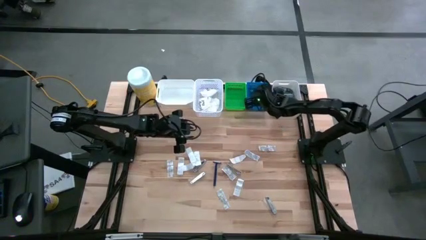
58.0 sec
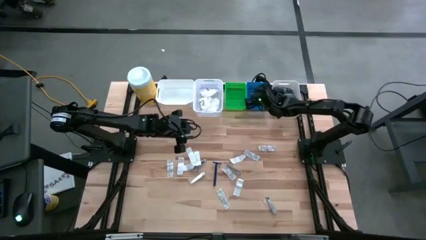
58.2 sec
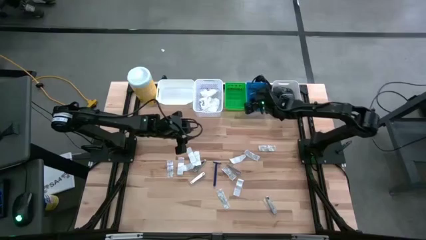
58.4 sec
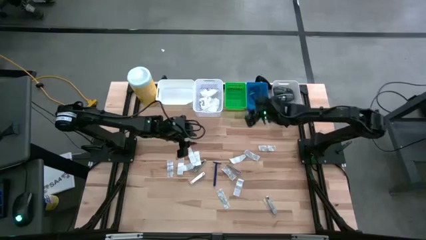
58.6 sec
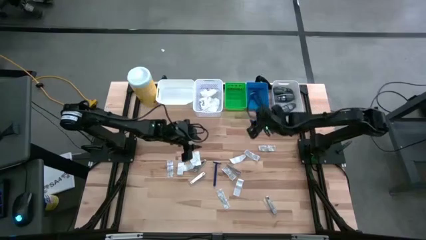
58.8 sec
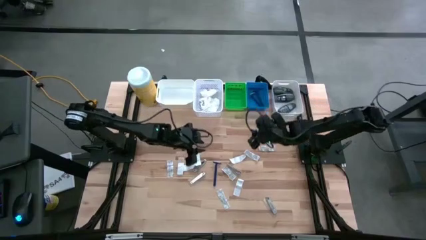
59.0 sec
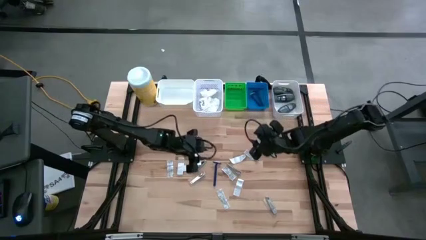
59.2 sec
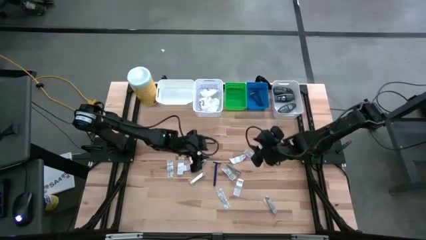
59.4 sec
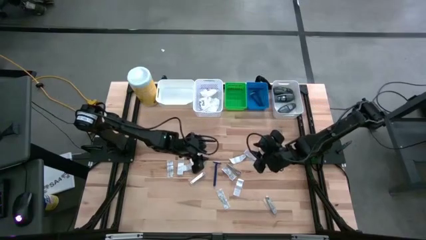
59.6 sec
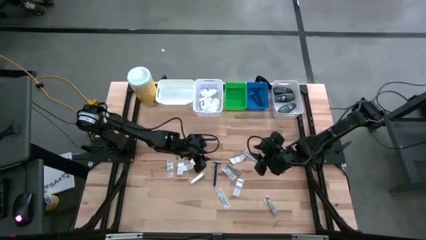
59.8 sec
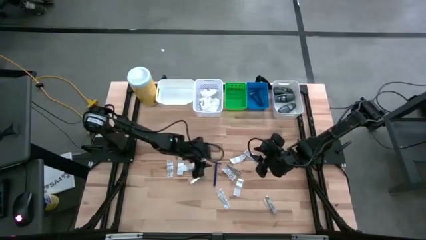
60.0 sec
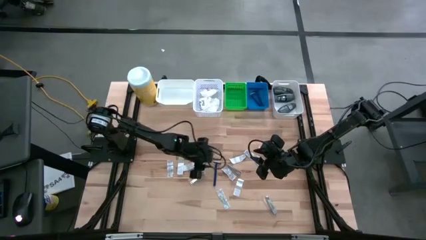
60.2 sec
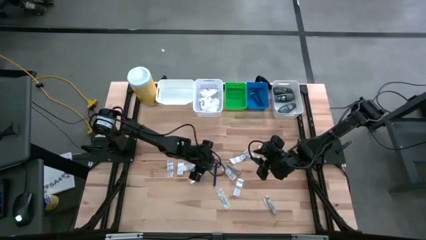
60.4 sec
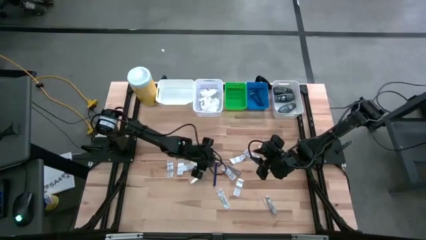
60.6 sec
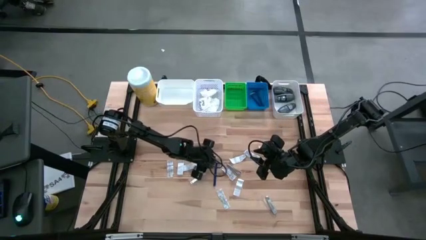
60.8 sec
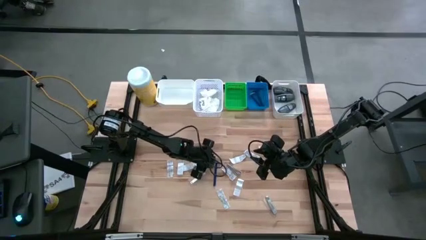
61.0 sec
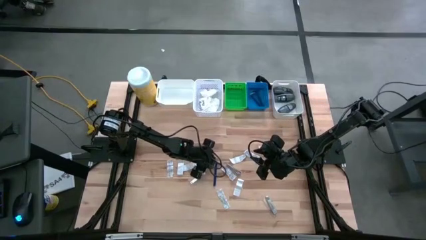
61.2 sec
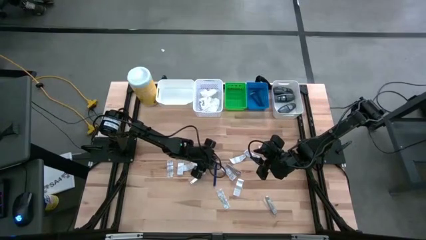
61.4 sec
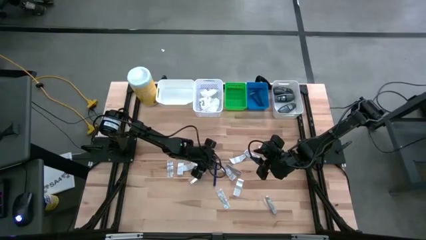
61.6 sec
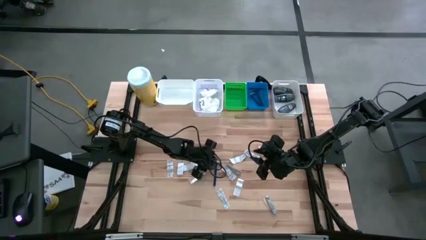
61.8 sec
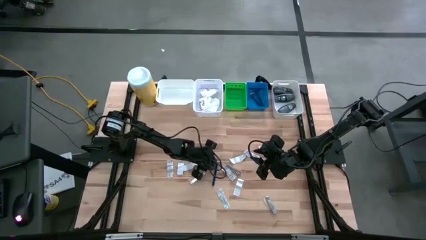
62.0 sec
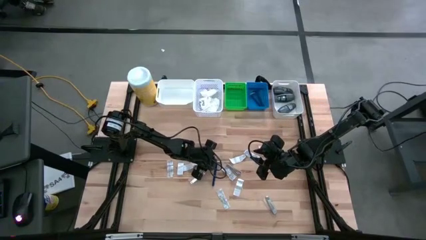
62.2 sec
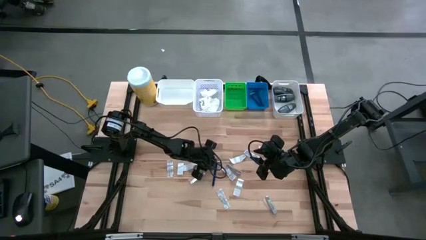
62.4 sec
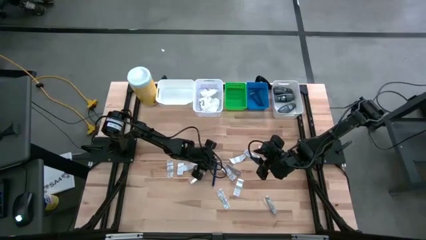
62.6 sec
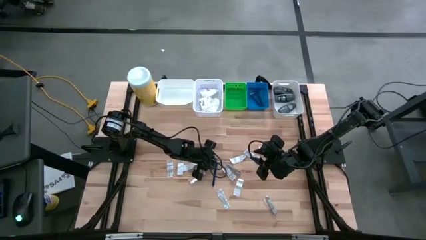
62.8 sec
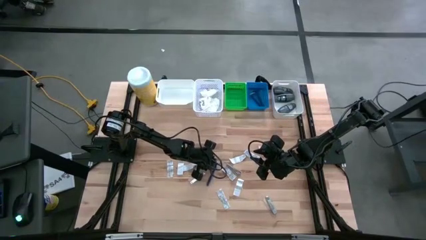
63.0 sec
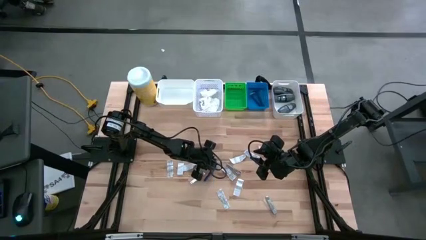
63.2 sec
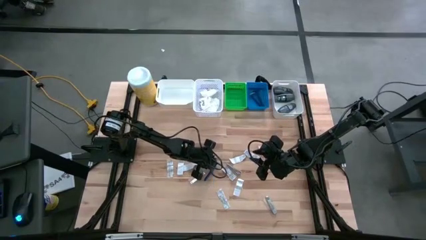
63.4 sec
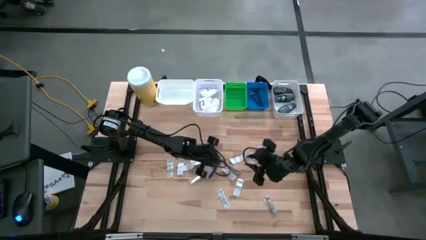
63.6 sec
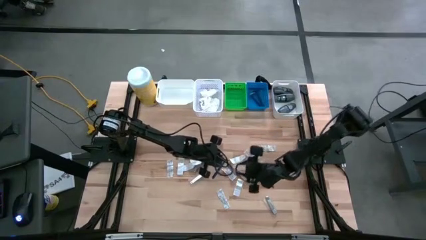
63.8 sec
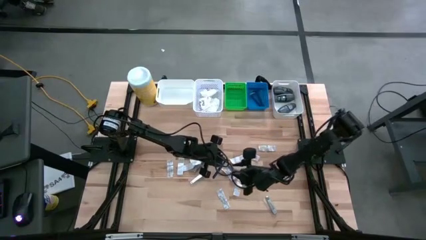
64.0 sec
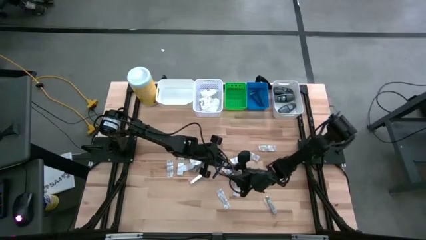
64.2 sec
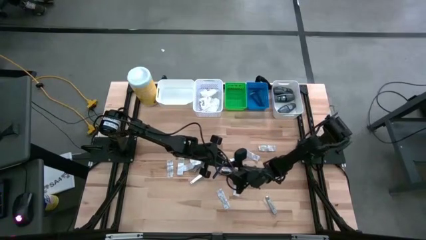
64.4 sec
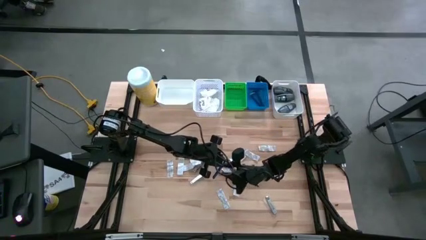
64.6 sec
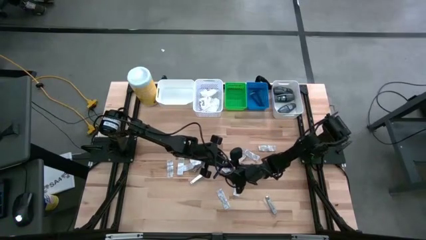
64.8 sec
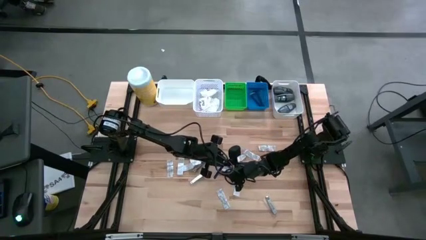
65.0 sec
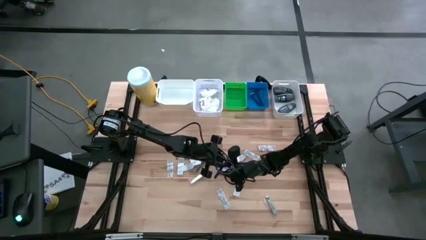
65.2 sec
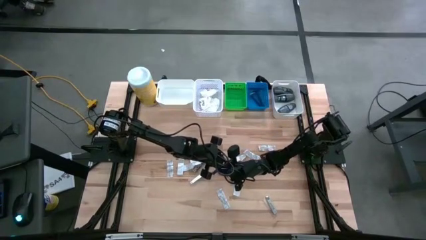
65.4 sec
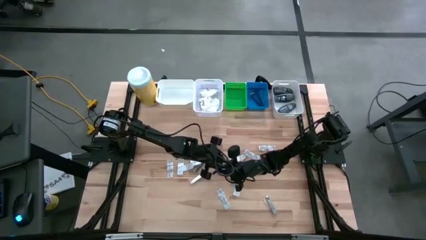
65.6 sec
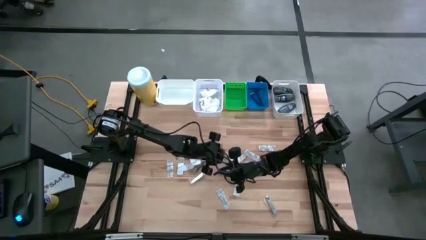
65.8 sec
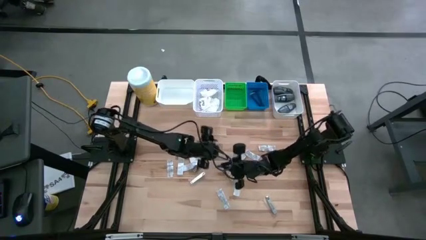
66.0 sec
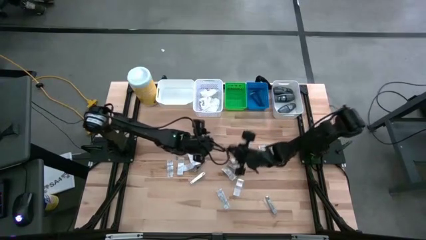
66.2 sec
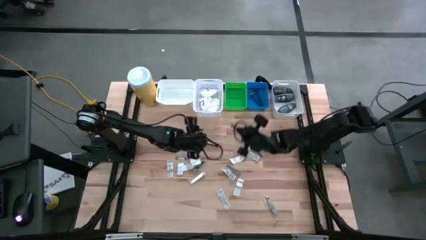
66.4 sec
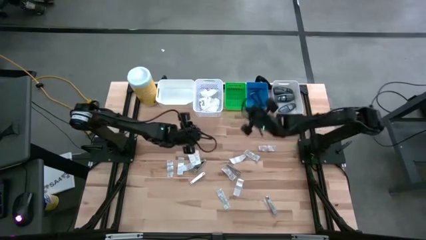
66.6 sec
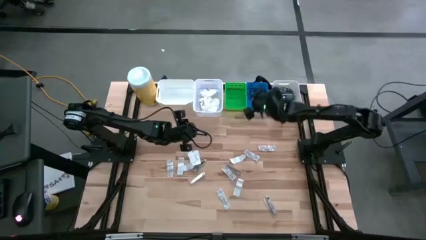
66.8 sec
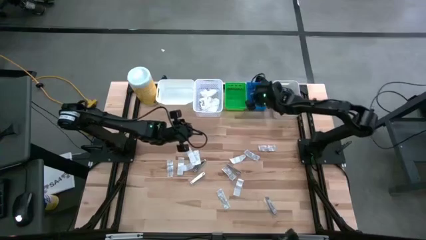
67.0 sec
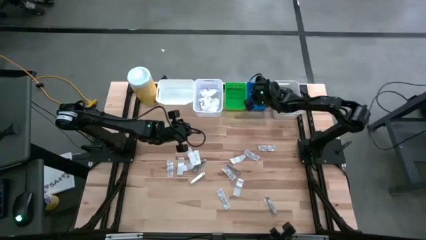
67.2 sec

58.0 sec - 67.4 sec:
Task: Pick & Place Travel size toiletries
Put the blue razor into the blue bin

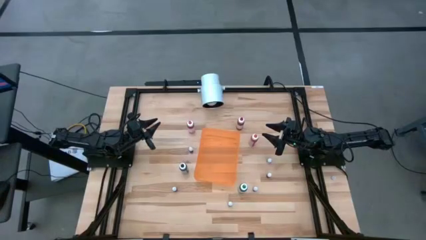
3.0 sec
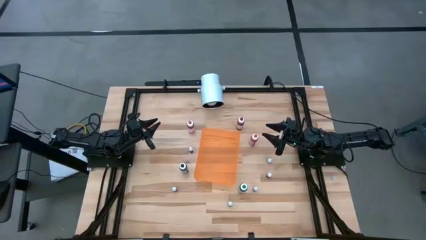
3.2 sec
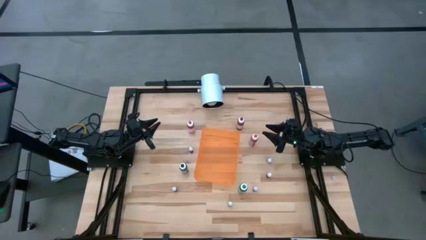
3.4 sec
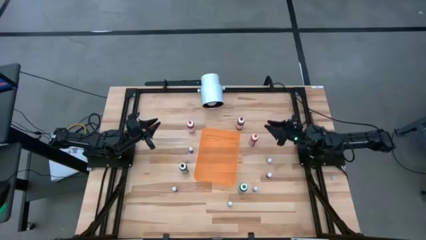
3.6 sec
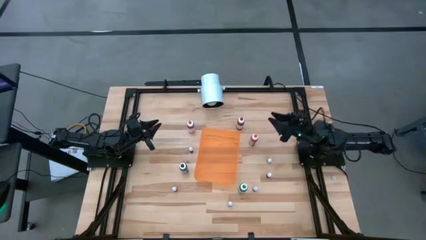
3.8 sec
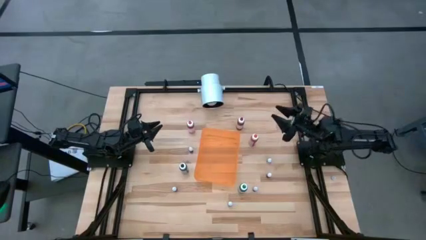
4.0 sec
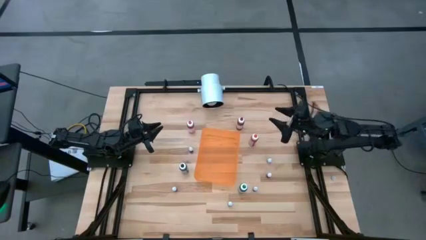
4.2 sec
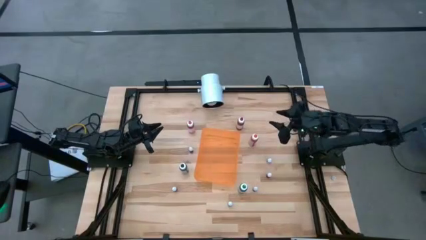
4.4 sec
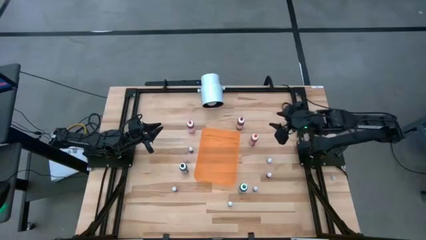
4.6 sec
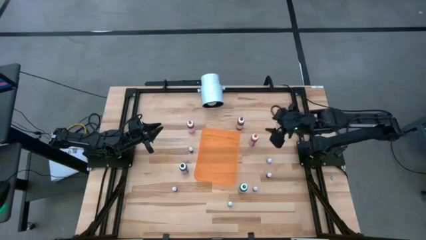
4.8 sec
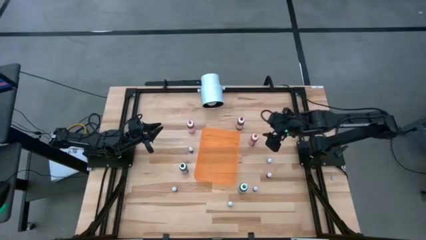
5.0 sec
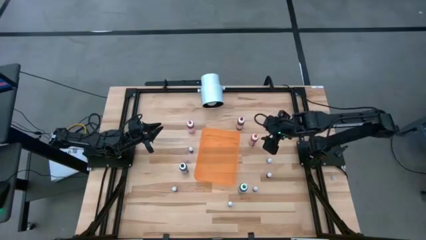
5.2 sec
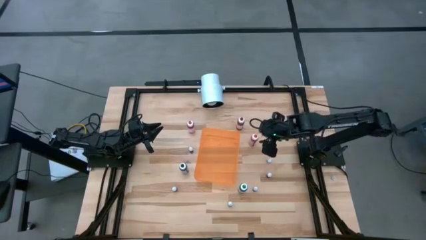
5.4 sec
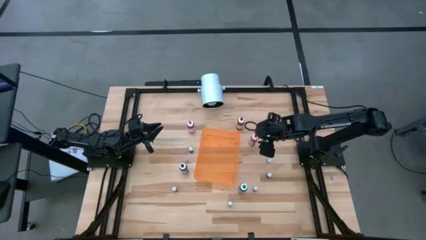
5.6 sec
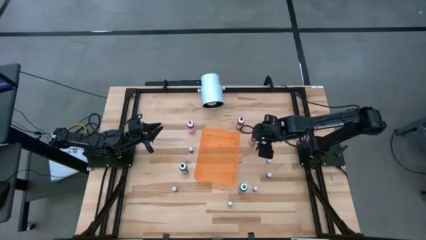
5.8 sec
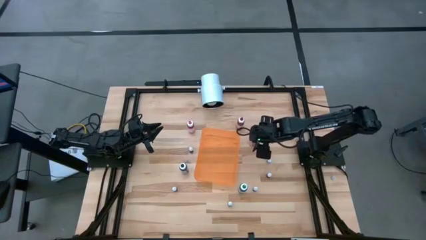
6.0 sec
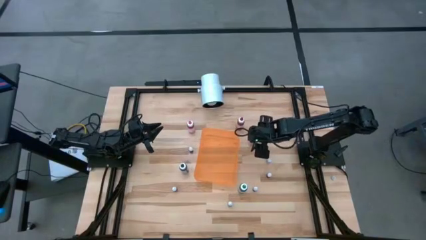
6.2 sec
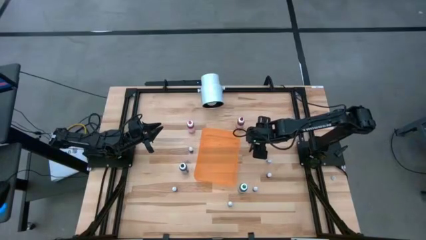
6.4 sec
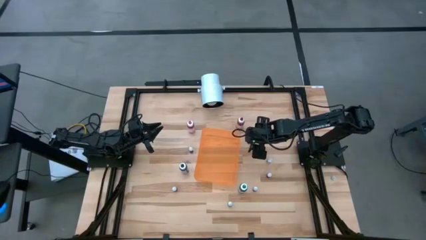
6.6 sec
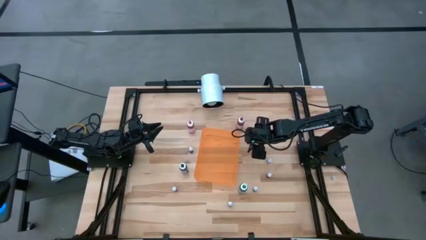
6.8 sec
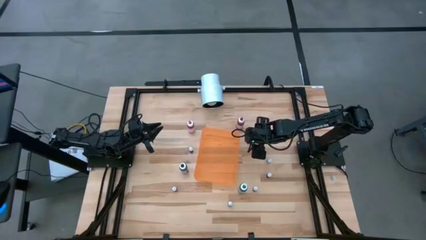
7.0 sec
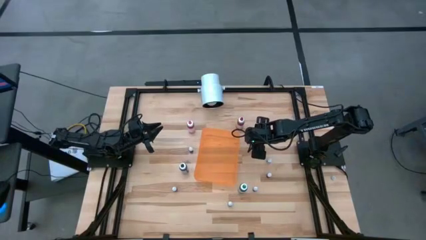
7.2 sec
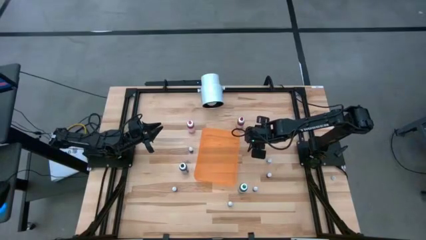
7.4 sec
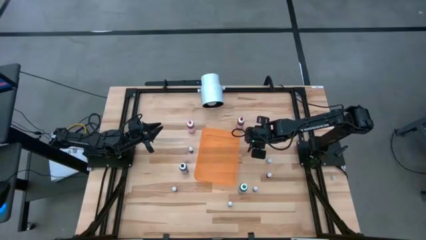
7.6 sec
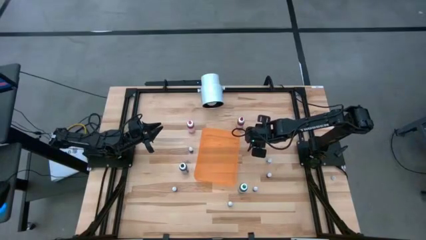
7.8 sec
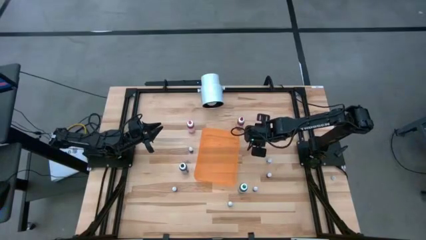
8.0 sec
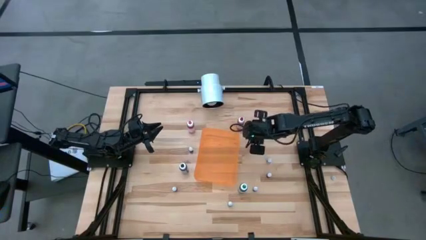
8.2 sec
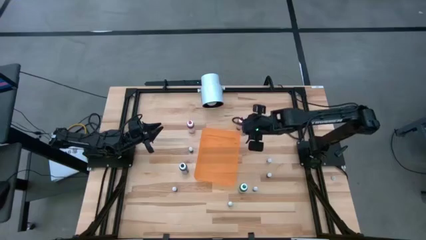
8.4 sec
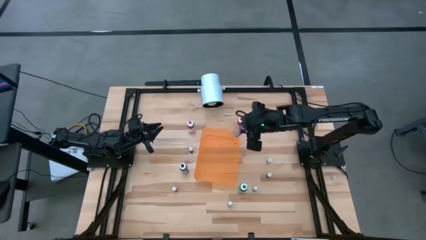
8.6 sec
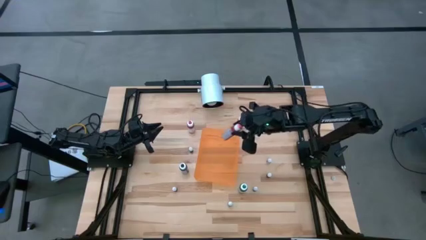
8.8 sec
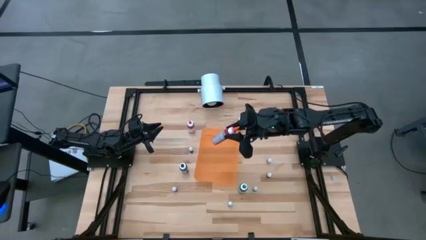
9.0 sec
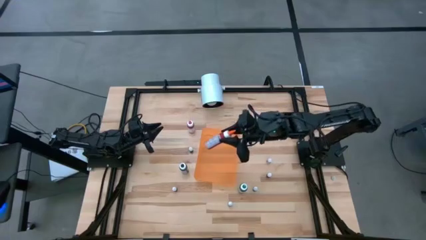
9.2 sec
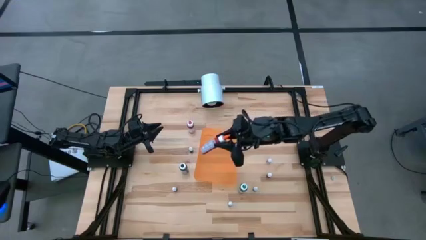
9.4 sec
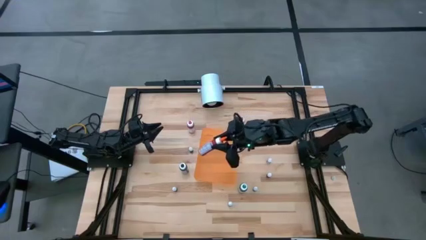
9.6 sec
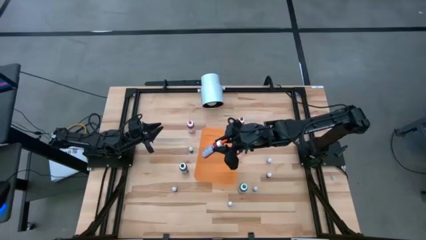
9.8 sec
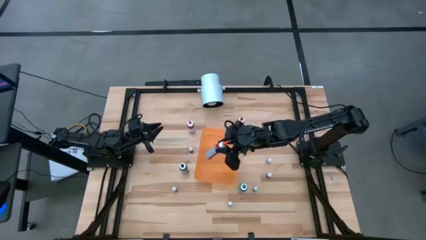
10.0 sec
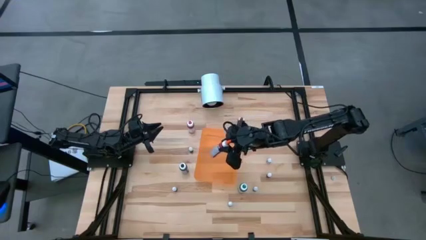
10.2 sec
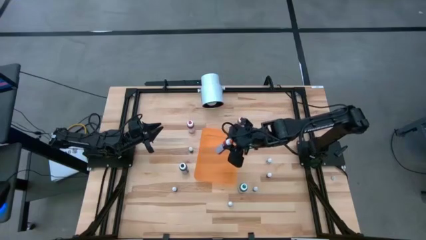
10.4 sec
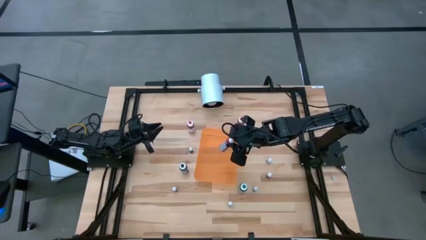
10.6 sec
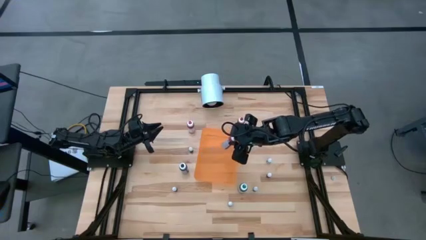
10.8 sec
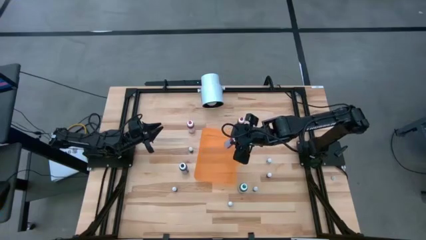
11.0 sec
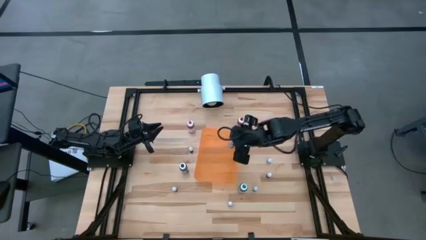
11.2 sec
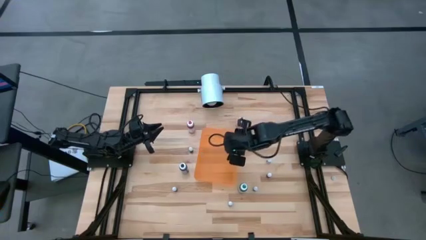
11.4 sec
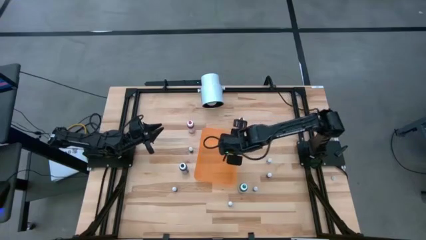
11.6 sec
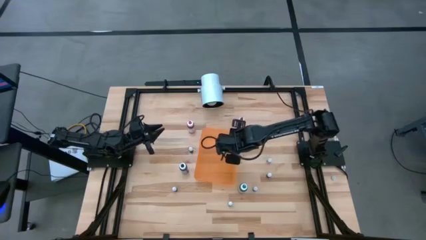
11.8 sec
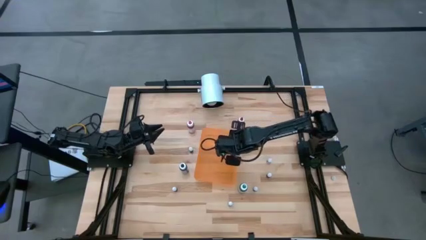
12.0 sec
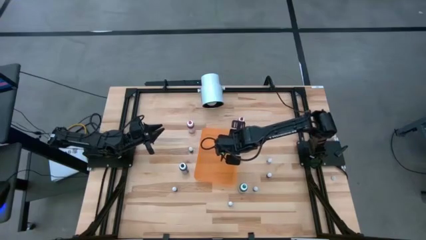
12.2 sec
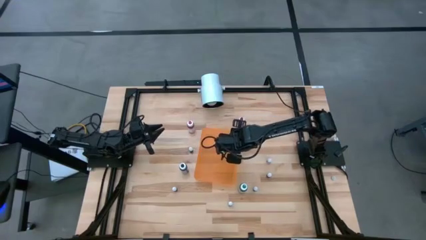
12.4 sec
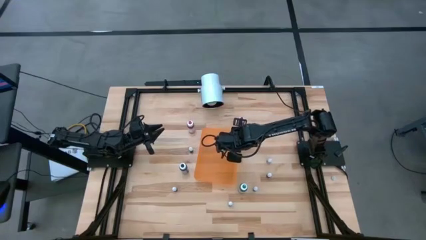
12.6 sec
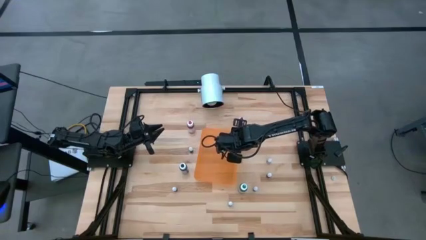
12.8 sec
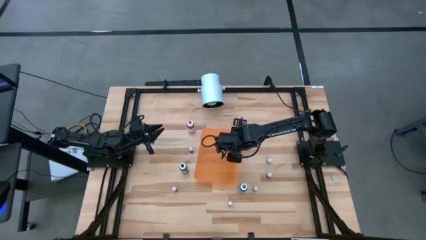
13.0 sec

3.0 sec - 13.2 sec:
Task: Pick & Place food coloring
Put the large orange food coloring bottle into the orange bin
